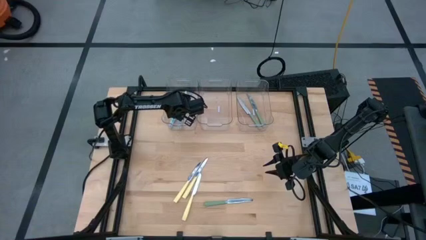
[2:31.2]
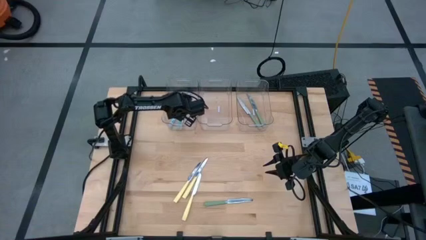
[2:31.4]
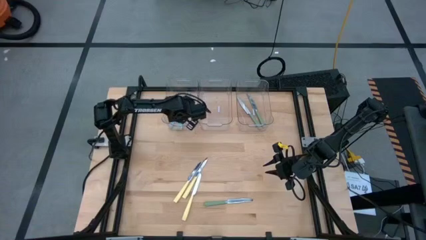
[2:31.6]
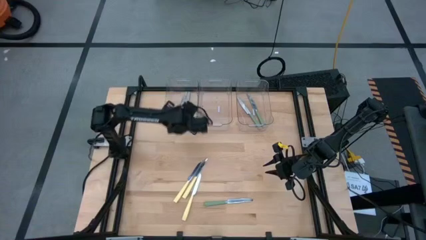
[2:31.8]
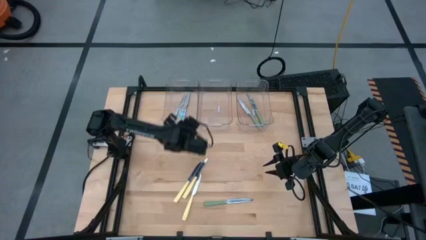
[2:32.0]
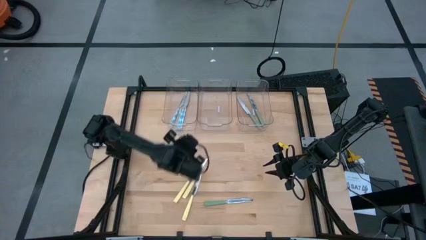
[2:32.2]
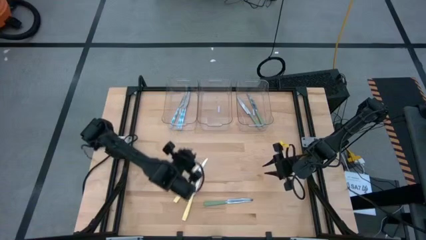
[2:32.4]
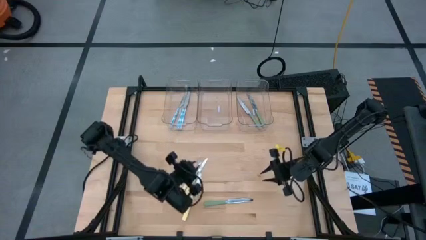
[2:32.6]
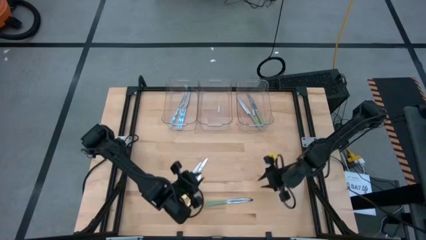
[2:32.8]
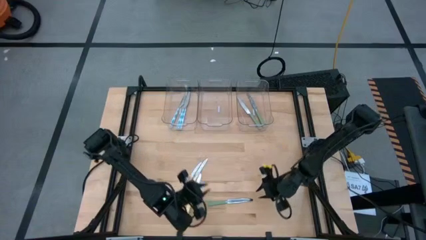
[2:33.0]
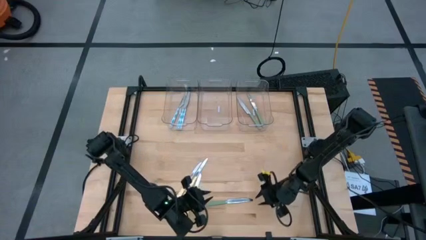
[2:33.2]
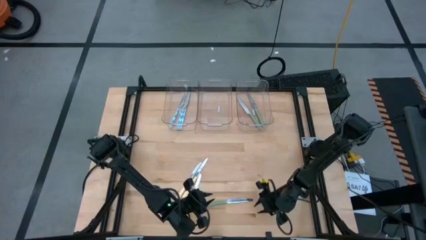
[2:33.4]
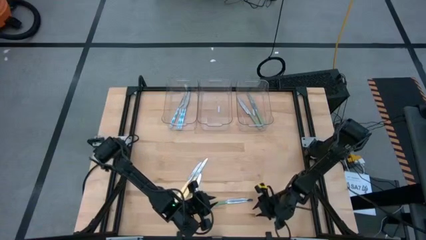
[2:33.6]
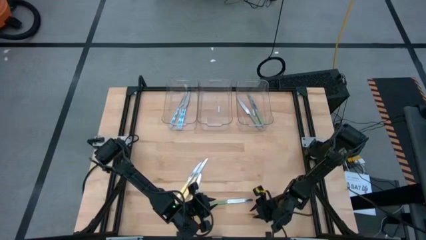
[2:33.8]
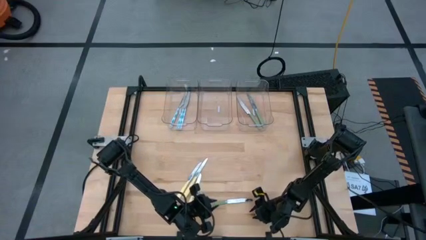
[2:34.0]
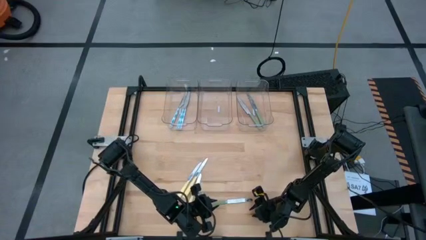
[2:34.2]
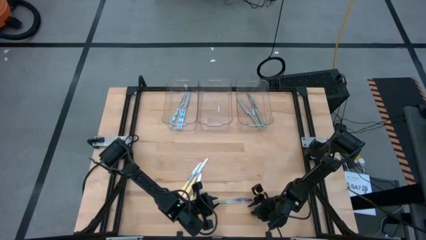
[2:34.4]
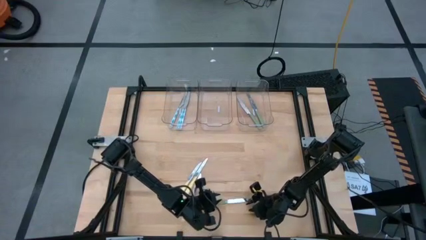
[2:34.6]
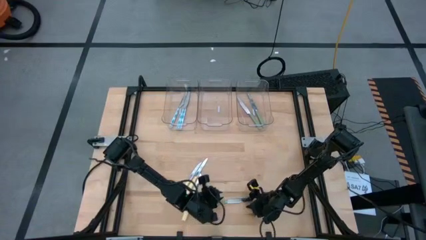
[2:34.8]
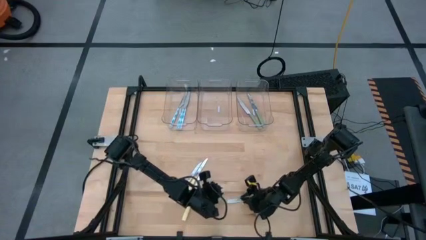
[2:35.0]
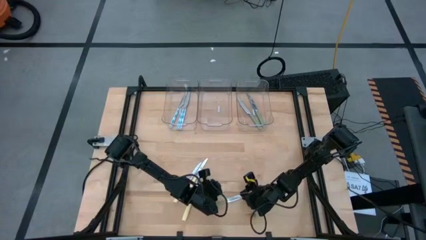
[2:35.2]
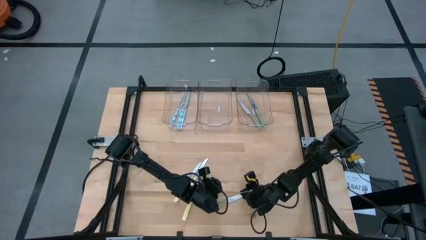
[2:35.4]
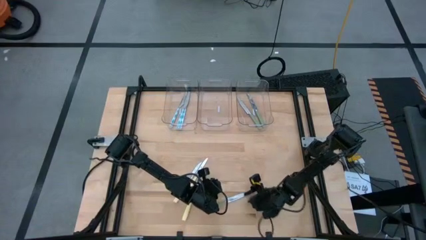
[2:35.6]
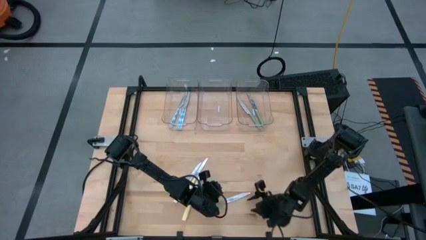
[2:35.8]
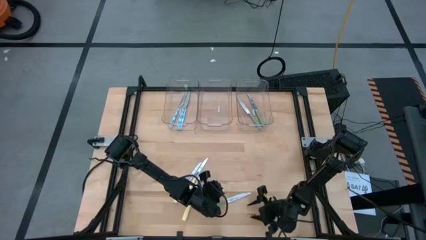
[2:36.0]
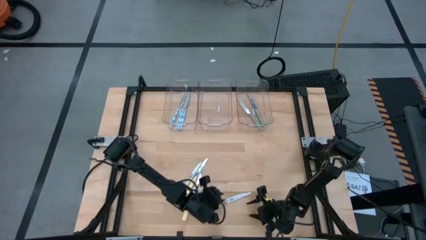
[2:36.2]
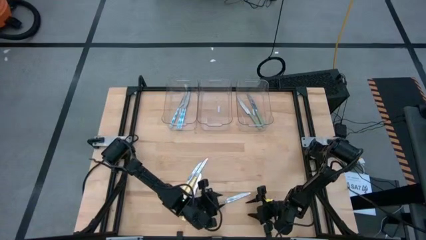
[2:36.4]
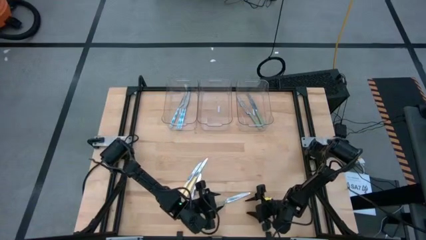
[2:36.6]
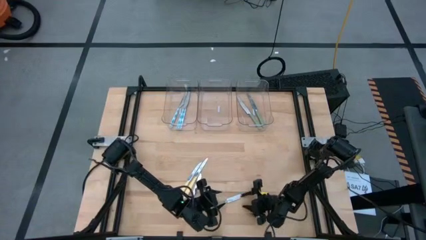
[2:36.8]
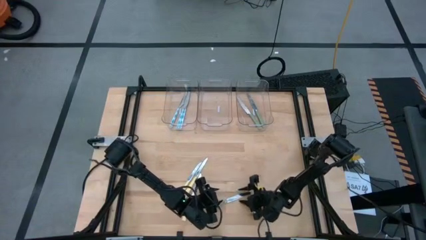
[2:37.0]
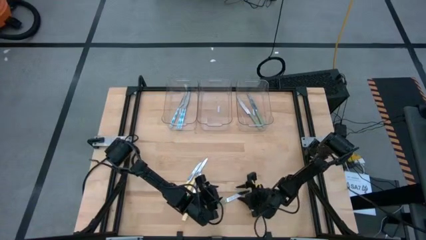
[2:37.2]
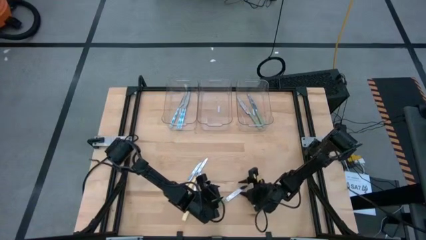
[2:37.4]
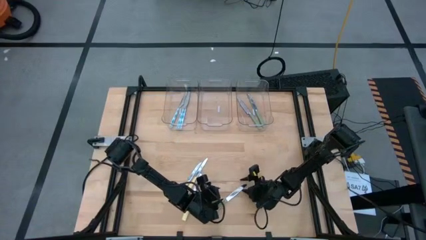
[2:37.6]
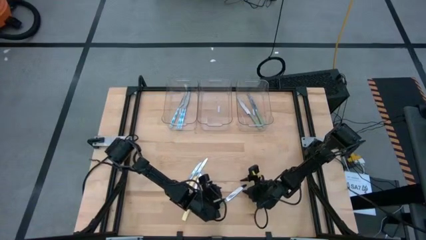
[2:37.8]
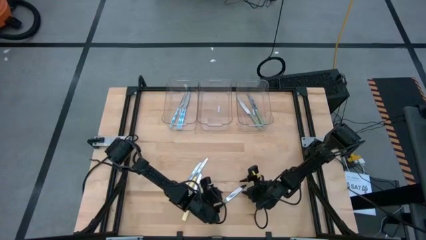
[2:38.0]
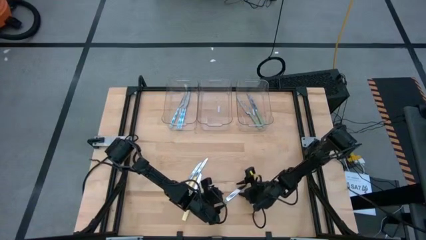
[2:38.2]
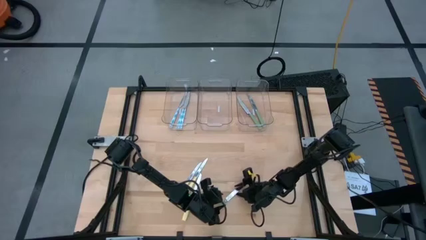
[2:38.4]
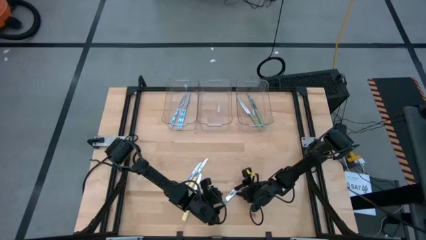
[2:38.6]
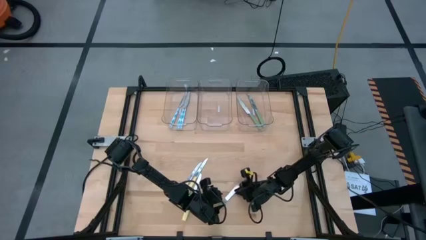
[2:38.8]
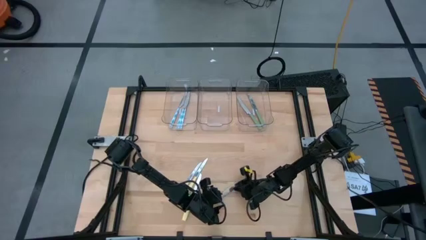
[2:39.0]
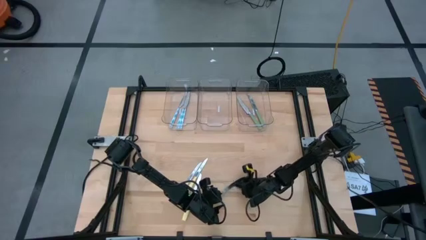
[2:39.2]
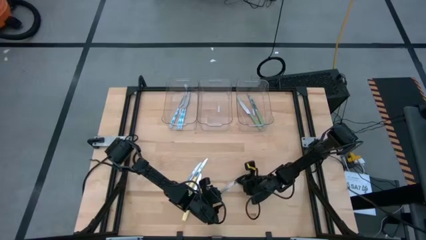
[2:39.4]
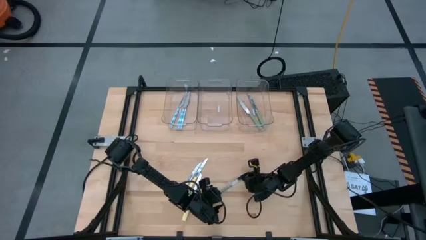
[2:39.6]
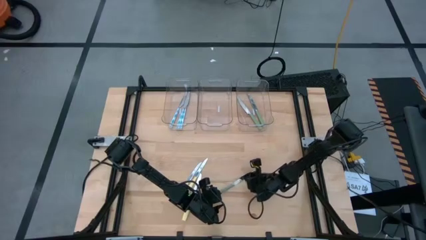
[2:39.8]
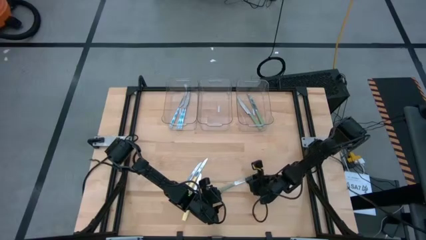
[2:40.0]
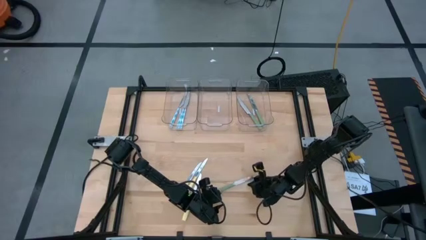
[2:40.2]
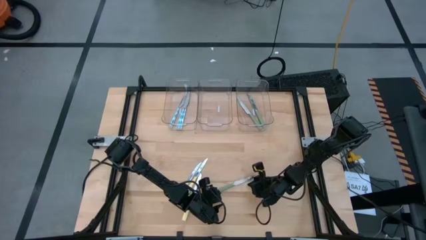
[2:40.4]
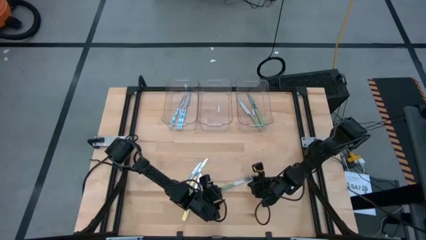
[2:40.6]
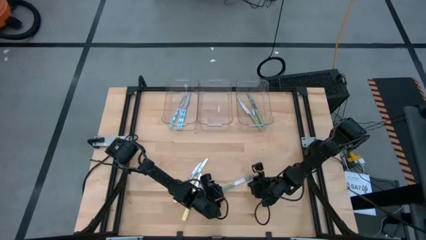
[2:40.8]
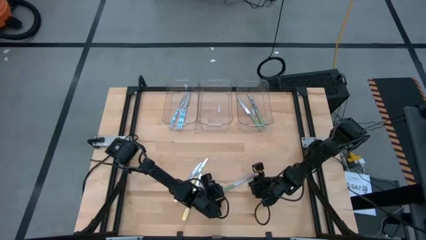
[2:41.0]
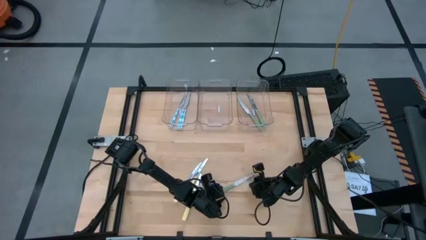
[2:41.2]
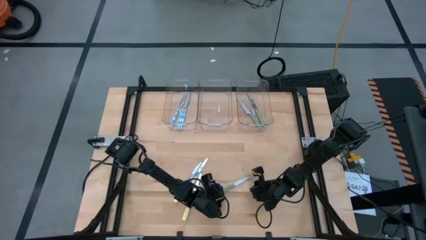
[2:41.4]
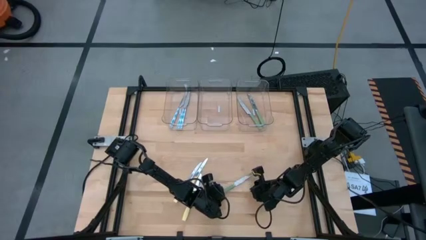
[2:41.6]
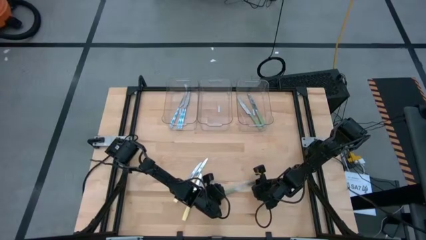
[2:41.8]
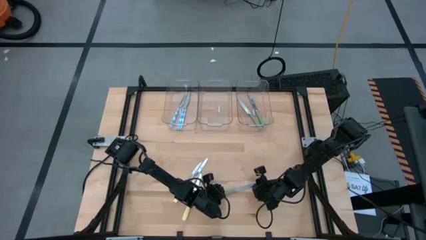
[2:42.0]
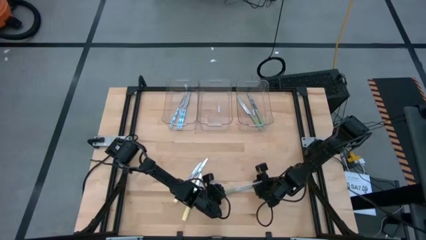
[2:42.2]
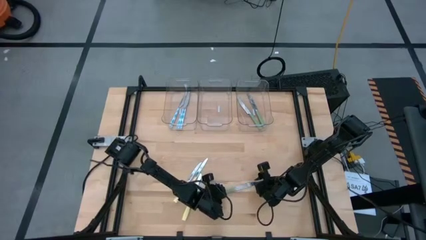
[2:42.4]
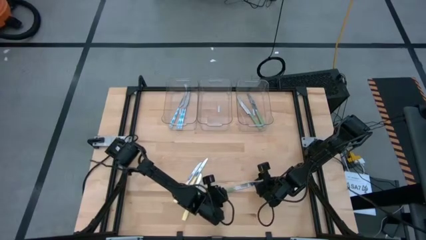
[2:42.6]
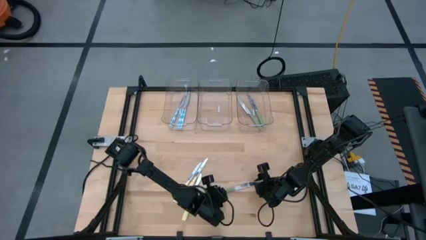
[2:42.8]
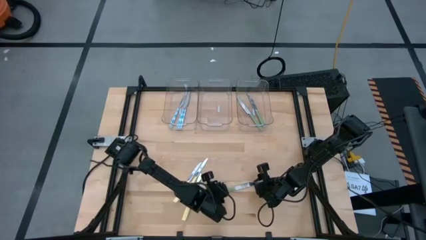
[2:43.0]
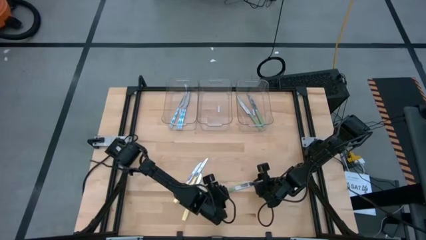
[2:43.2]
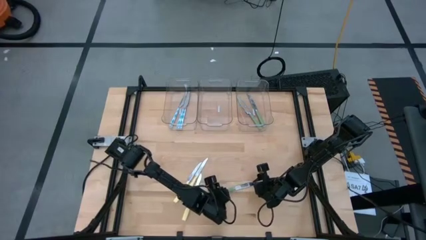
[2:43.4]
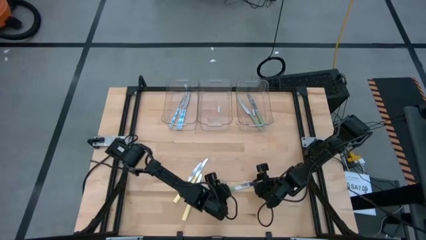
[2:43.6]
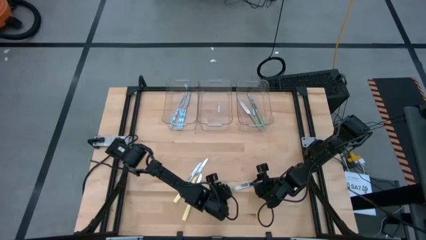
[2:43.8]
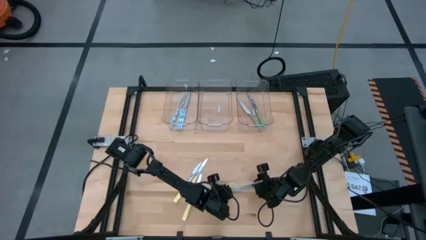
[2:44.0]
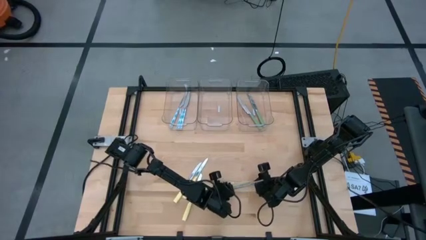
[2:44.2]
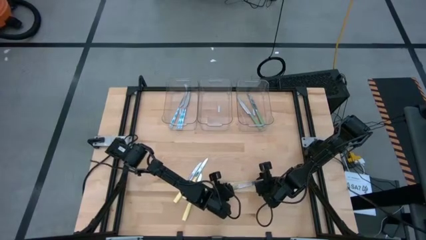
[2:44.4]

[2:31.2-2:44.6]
Task: Sort silverware by color (type)
Put the green knife into the right transparent bin

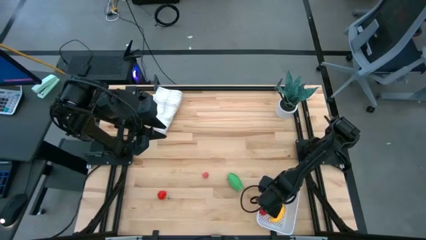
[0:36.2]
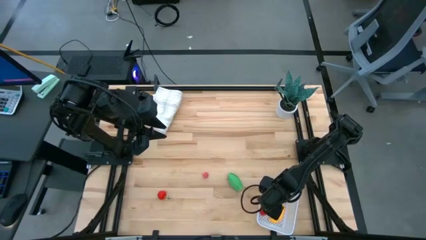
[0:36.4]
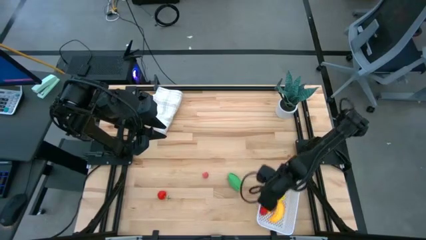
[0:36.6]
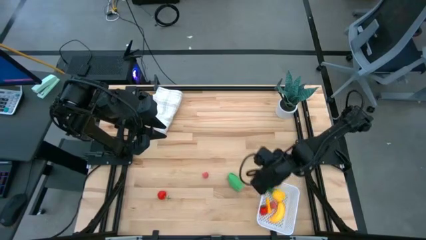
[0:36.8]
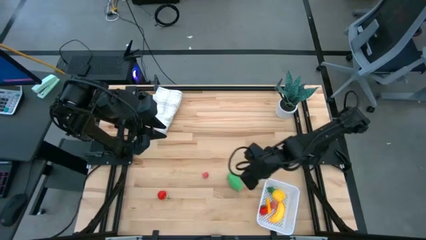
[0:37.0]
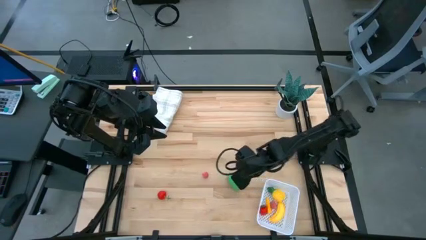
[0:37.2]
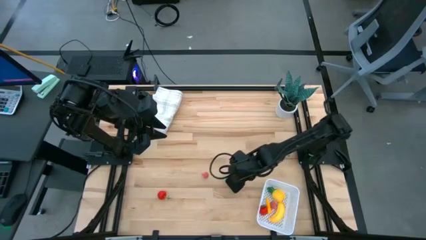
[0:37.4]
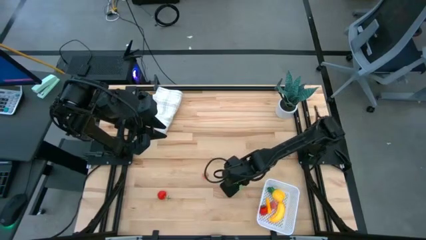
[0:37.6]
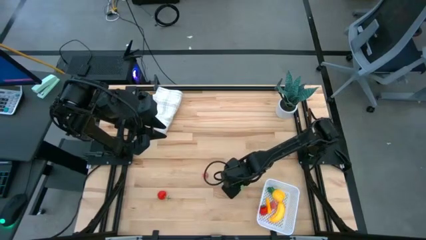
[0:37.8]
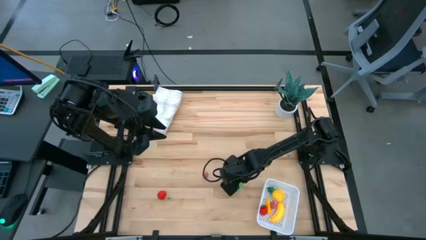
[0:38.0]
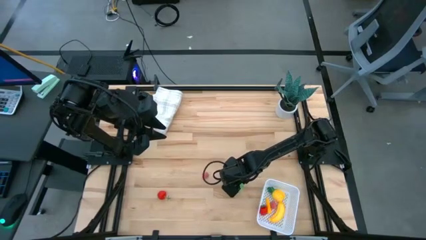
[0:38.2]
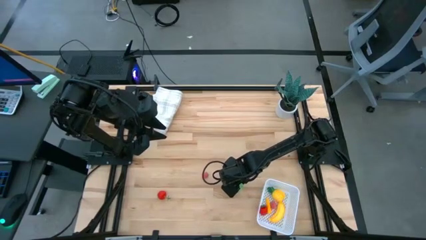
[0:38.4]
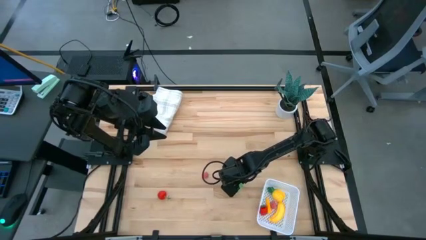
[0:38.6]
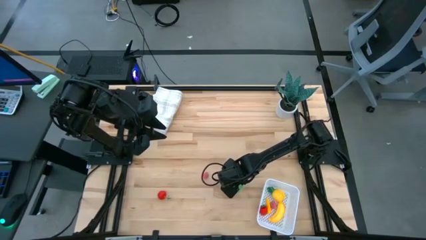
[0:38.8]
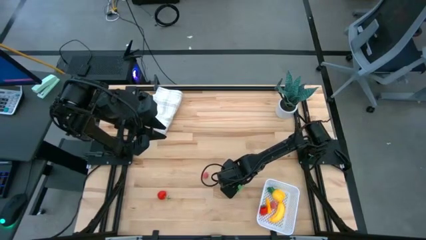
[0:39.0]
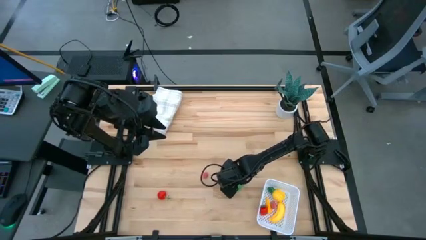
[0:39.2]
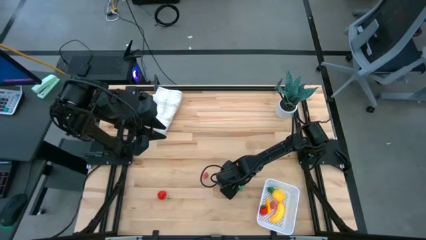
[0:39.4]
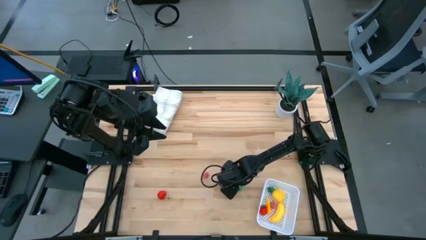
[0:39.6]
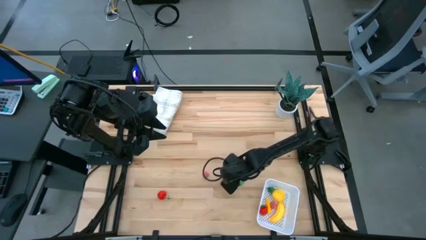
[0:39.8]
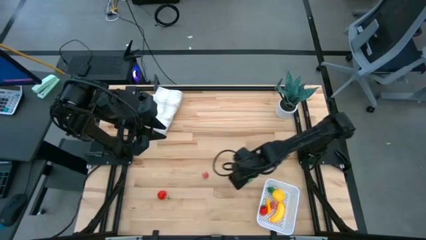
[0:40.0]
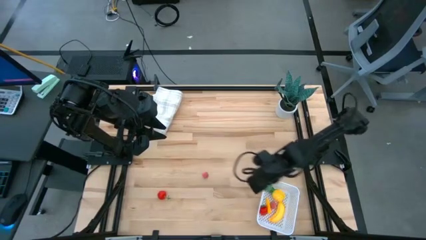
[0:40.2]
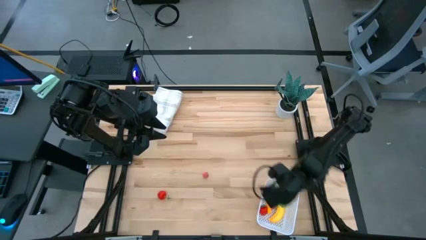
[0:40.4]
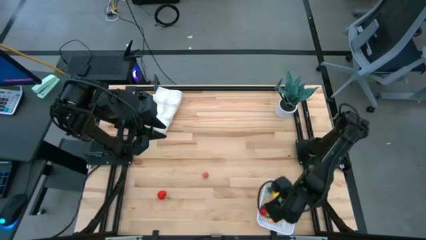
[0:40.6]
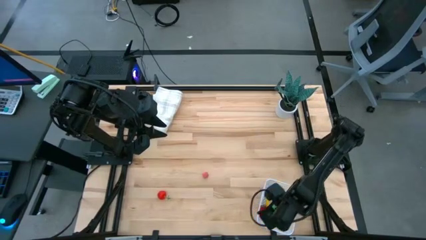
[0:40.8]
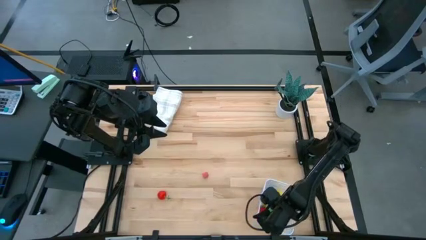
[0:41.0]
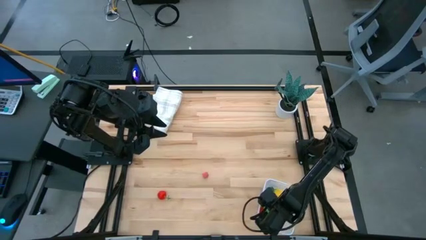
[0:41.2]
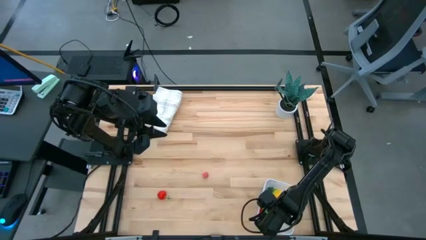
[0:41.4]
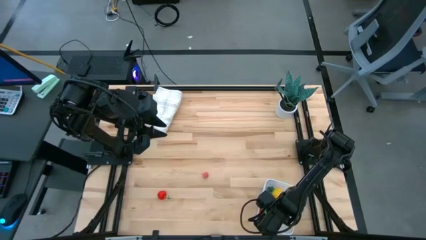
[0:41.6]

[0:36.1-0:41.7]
Task: Pick and placing Produce into tupperware
Put the green corn into the white basket
